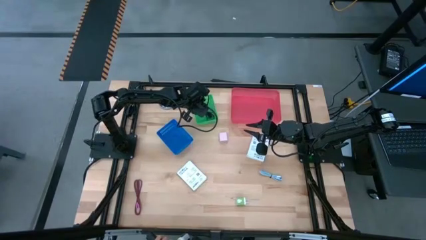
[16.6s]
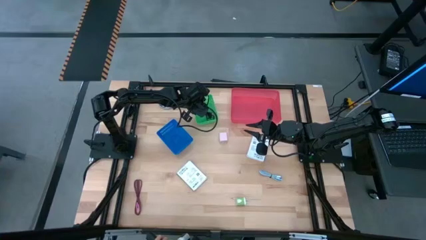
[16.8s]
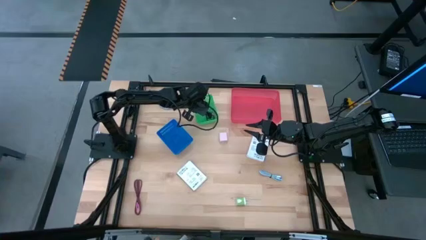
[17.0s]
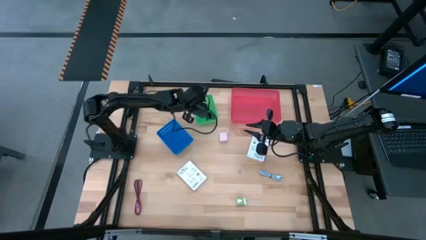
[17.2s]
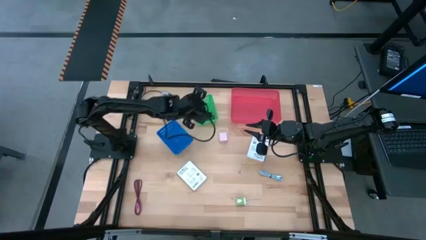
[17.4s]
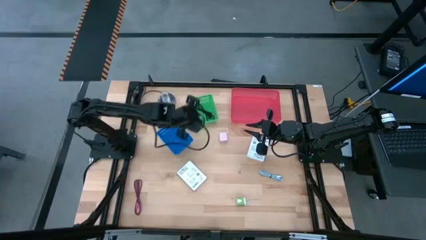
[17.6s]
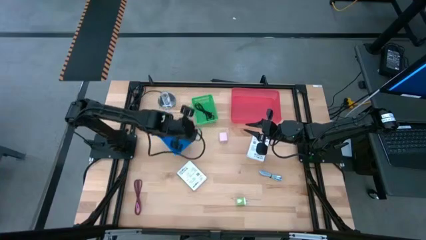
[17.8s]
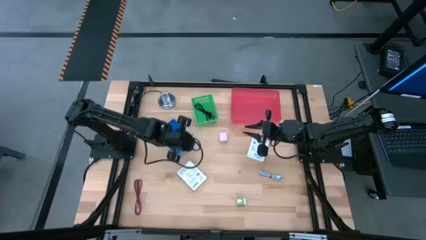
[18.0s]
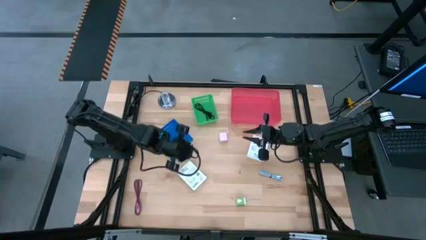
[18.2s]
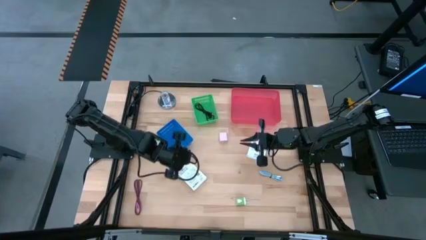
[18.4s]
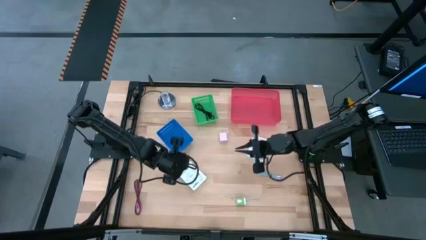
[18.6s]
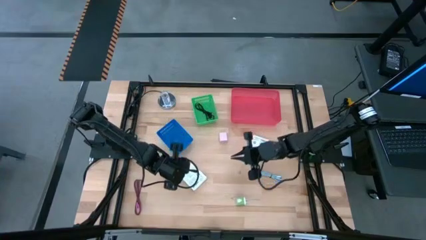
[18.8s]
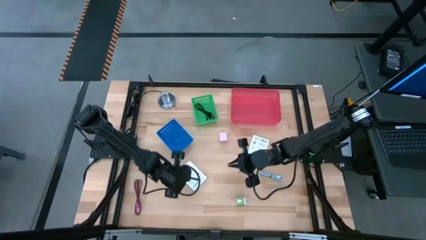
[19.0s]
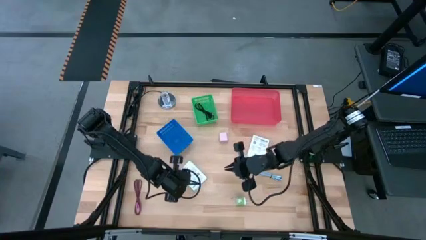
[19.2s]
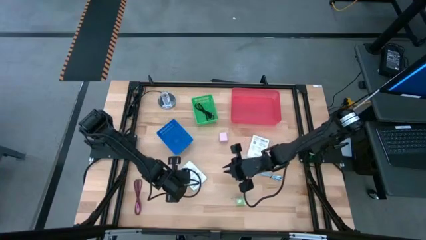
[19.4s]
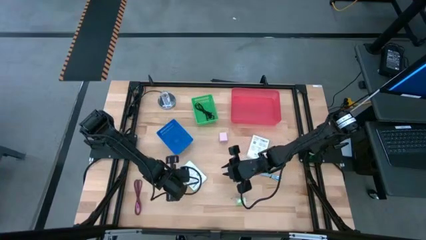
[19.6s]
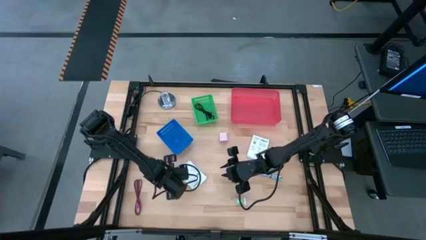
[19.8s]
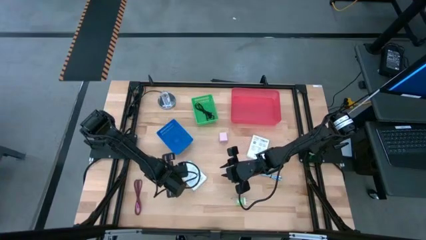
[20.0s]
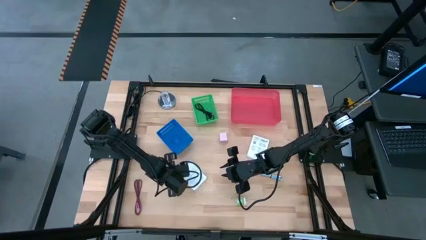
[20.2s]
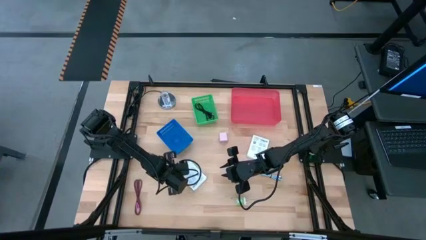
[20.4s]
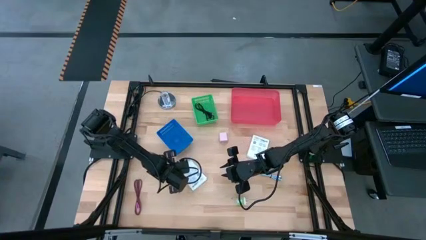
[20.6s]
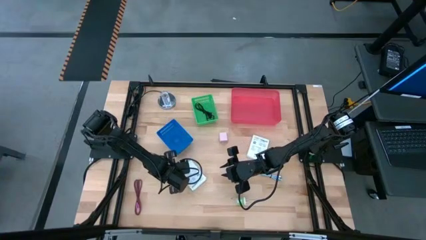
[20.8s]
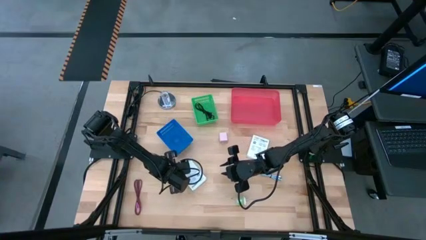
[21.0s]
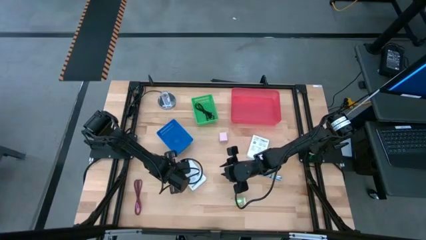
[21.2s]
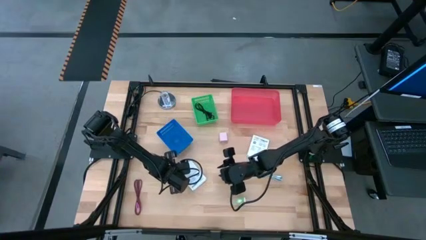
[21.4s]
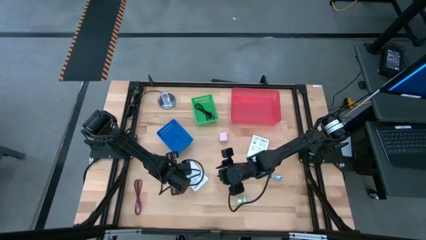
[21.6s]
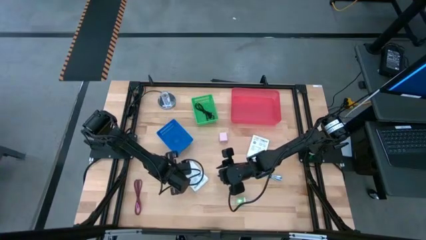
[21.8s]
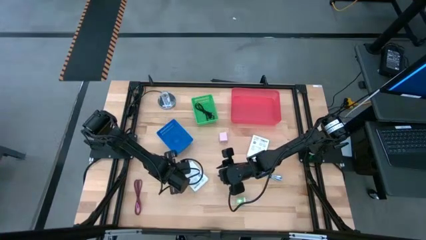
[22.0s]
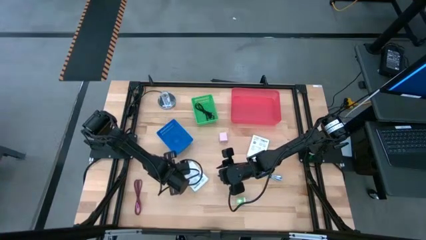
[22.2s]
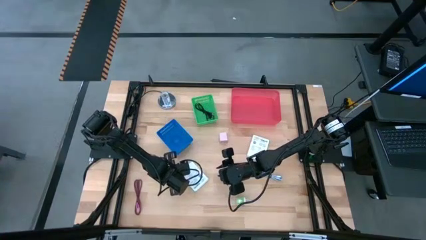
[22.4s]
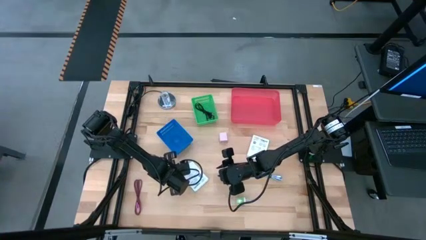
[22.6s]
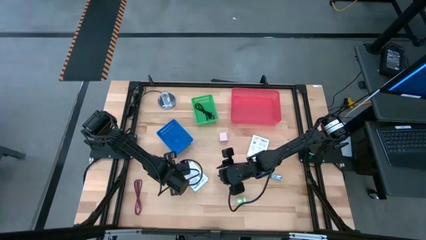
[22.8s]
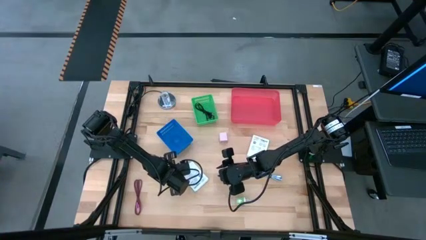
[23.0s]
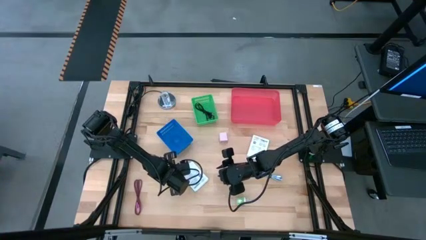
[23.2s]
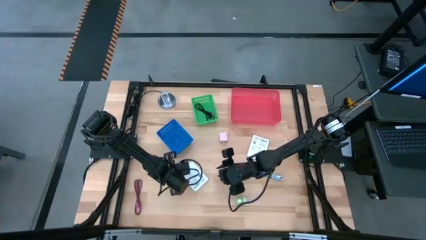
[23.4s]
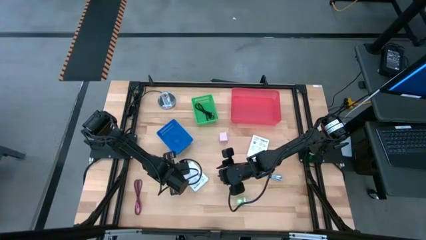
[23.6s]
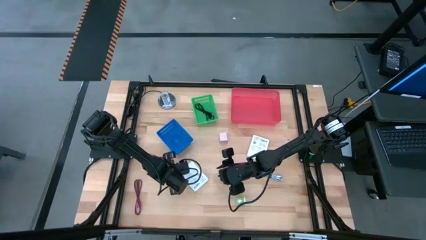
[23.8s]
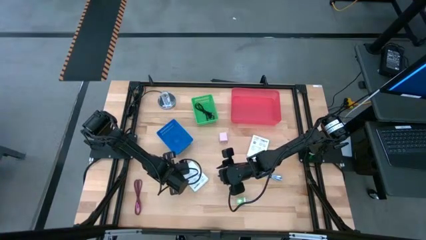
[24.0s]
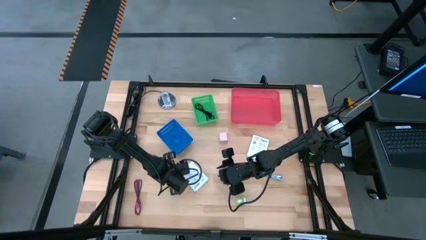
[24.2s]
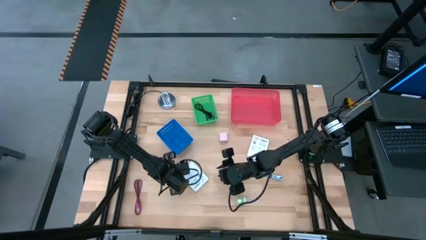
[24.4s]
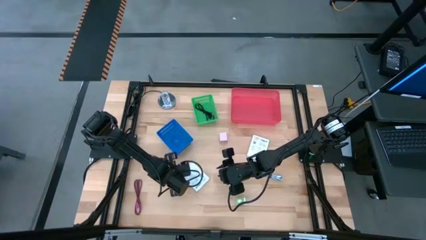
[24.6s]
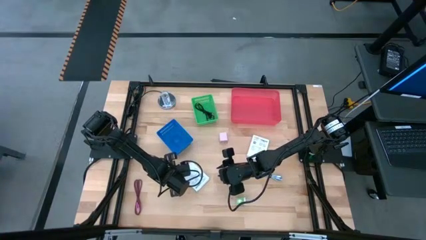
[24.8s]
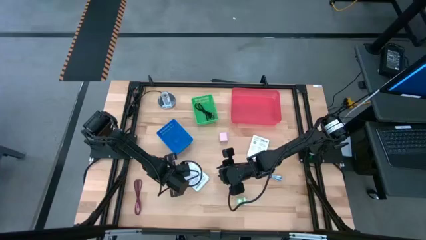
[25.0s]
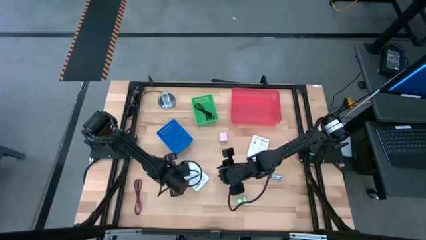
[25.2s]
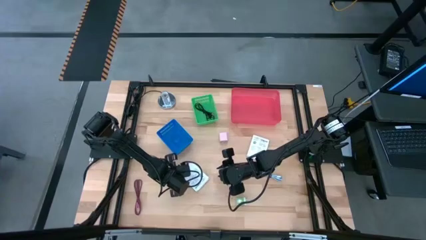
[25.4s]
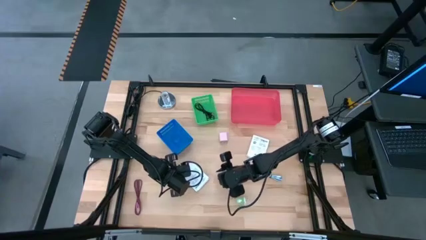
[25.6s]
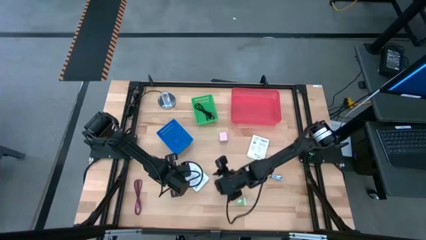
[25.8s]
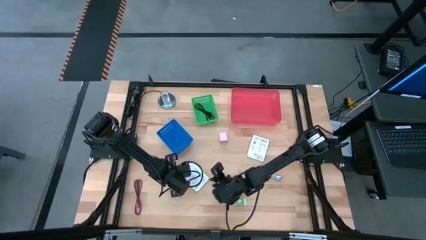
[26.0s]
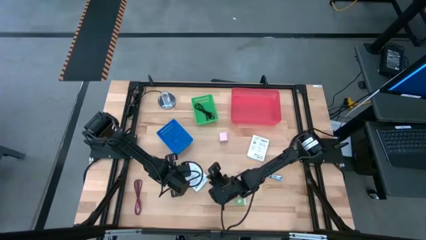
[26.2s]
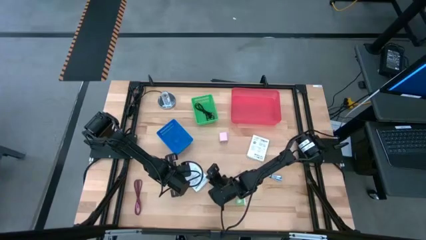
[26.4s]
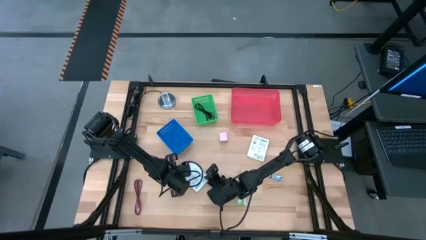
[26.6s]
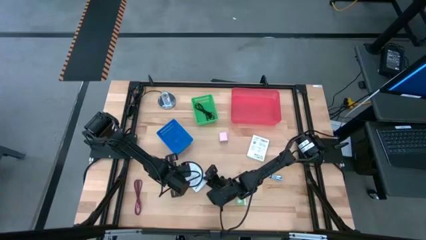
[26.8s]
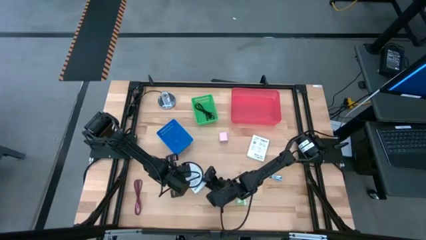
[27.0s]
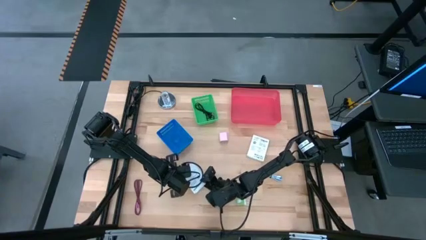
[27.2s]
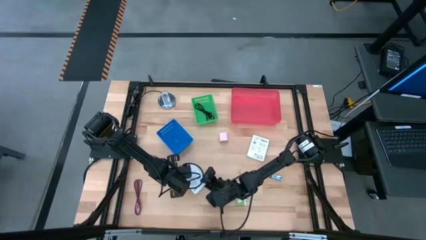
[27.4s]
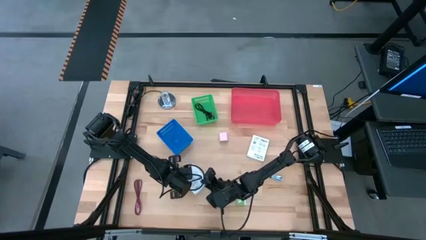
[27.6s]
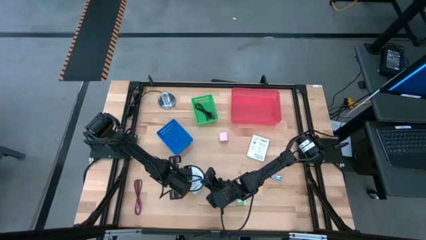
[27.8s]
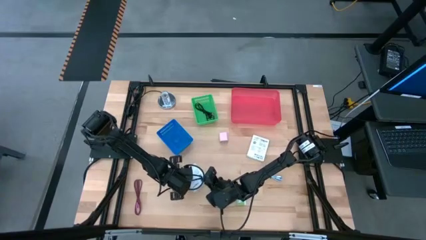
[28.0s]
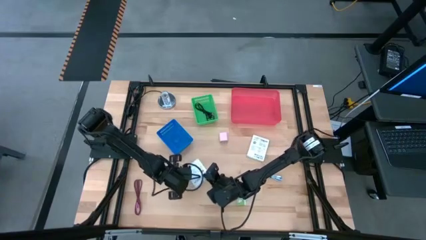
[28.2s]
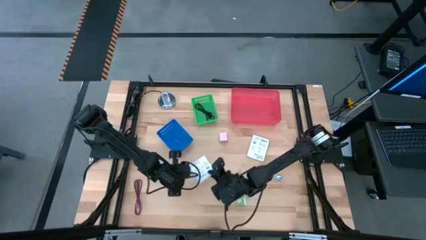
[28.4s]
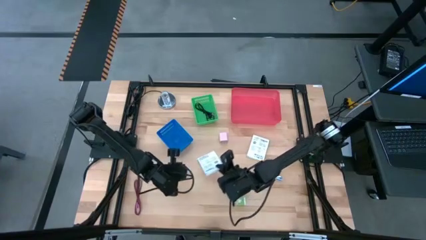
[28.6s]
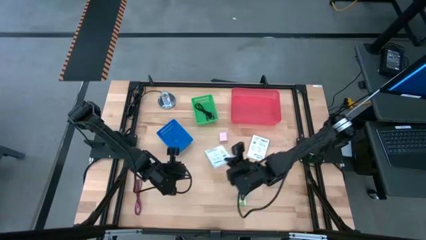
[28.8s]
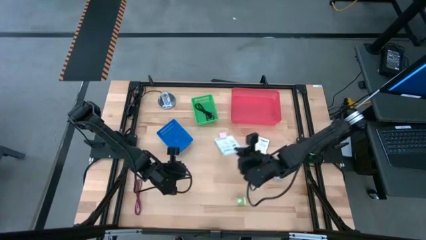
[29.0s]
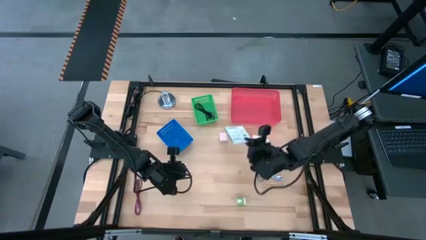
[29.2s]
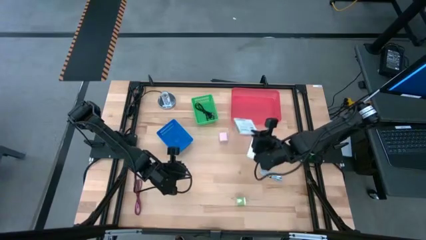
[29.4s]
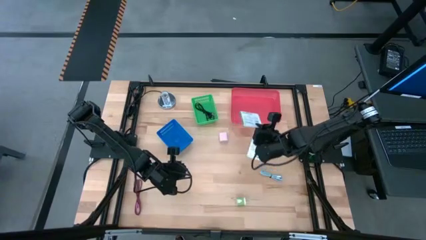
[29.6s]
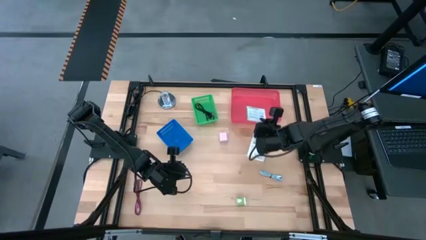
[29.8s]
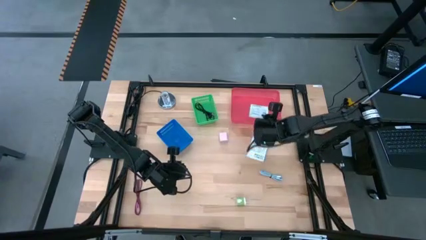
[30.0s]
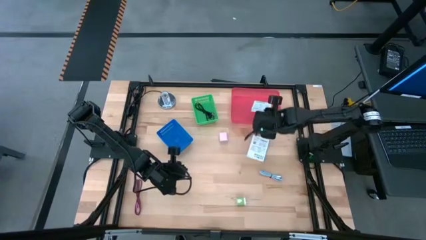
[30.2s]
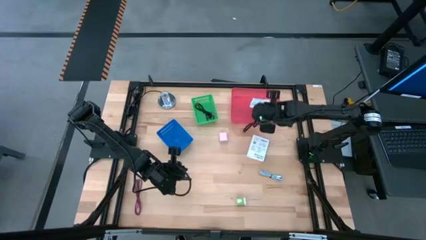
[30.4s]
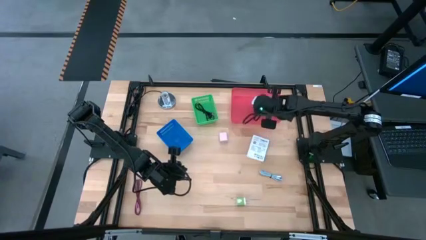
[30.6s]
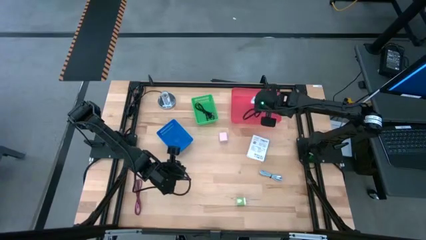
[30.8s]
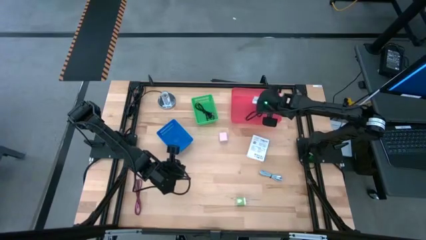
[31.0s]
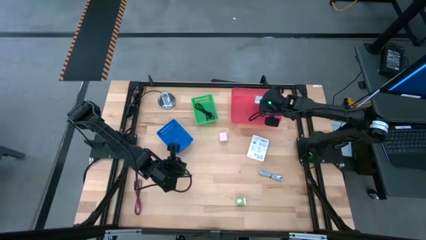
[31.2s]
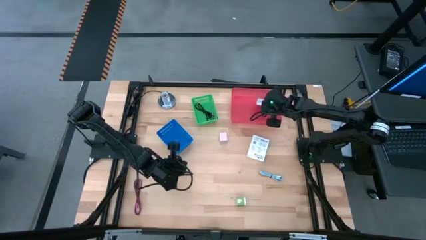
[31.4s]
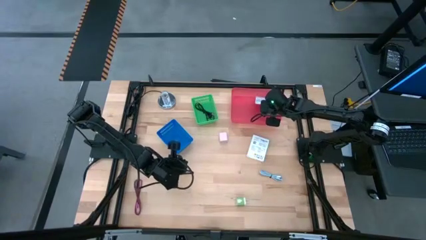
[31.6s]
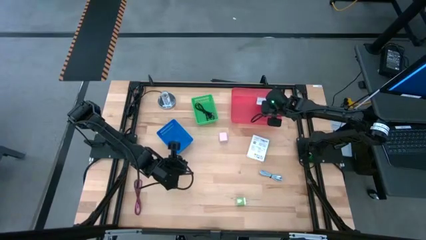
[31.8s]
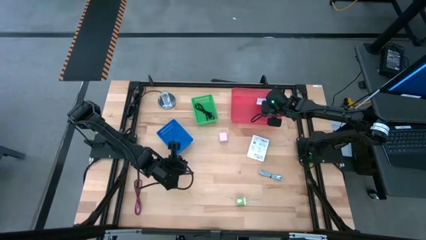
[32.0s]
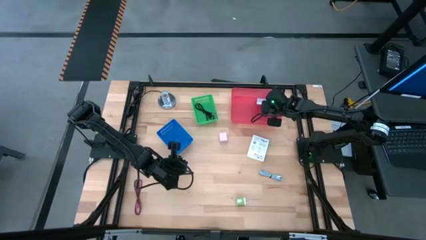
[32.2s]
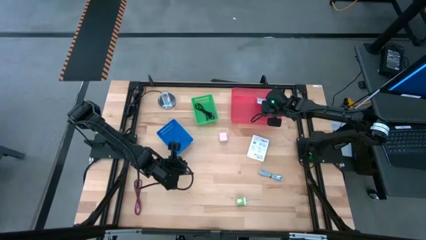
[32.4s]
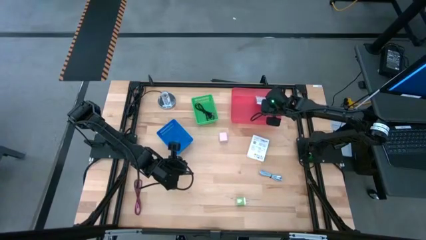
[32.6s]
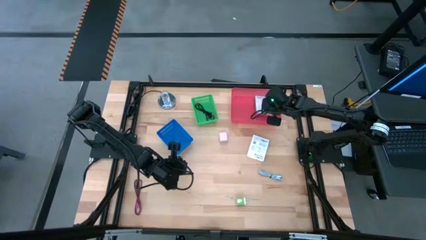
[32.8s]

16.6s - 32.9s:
Task: Pick and place items into bin
Put the left white card reader box into the pink bin
